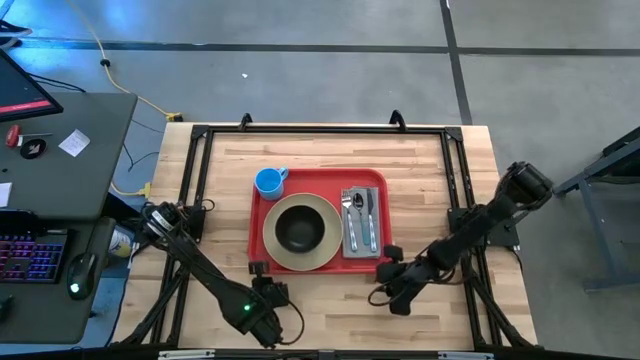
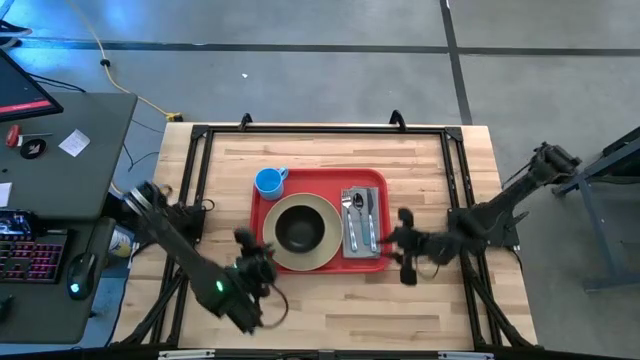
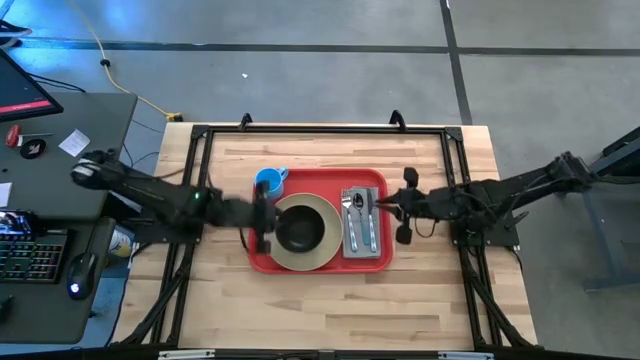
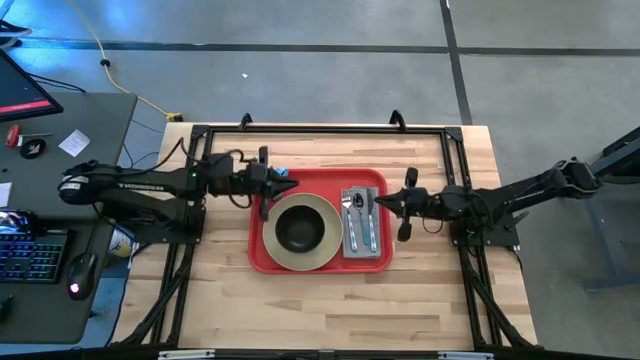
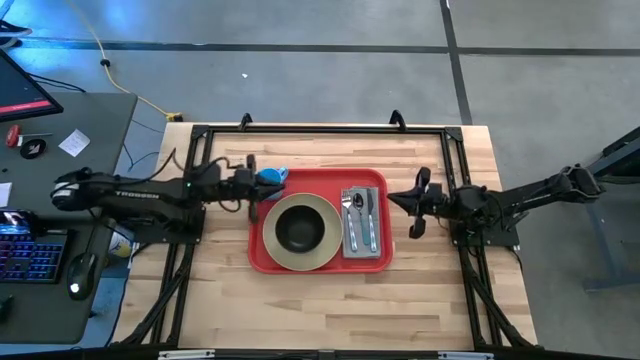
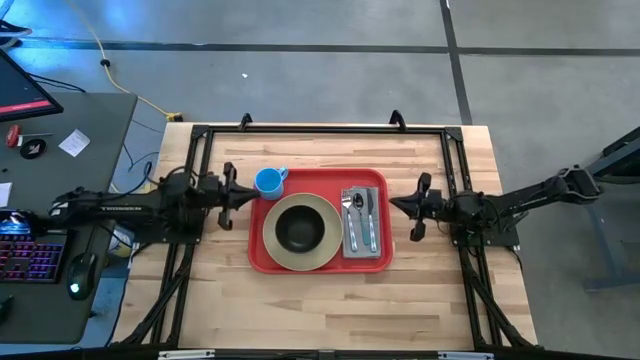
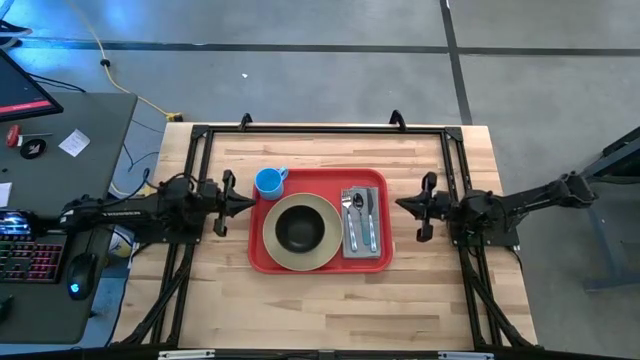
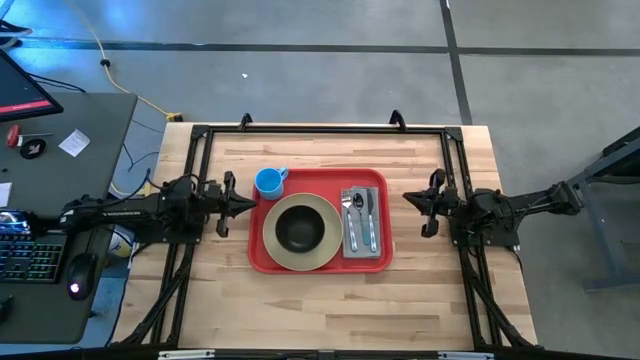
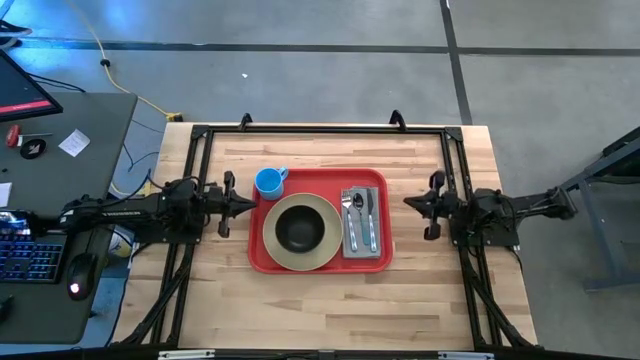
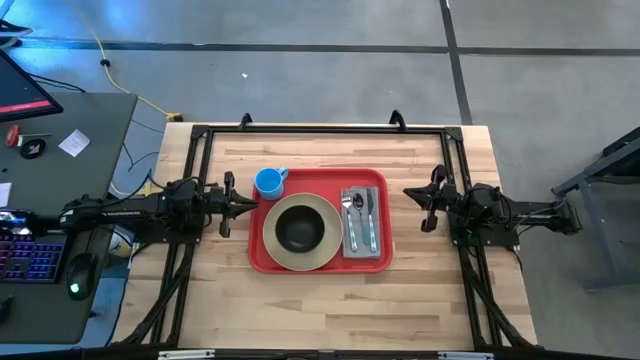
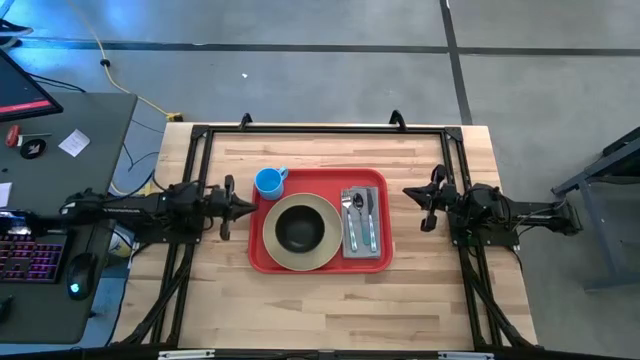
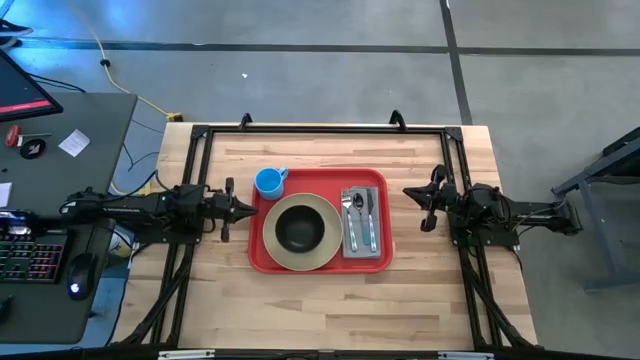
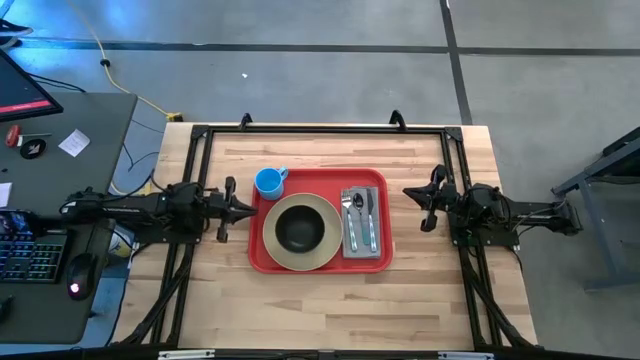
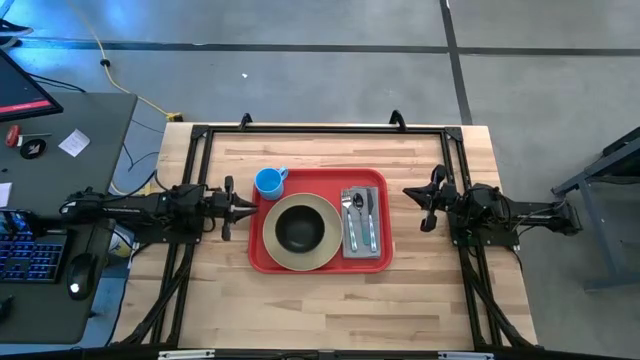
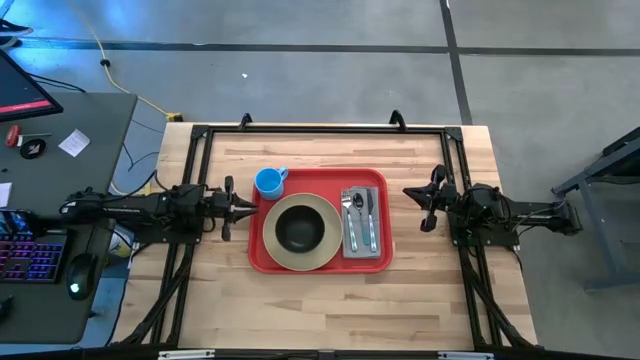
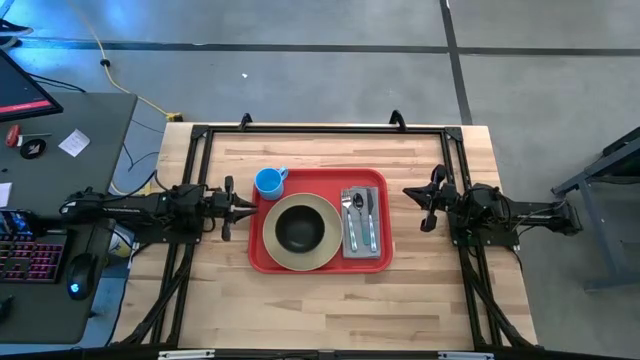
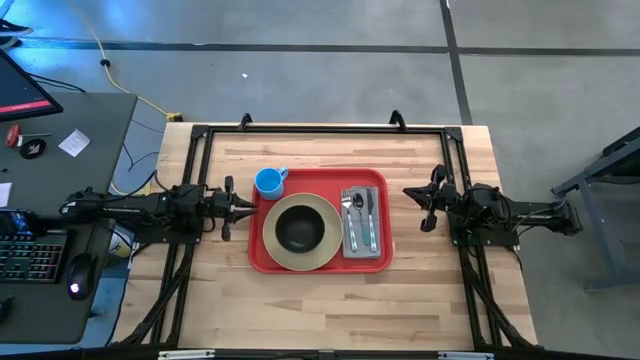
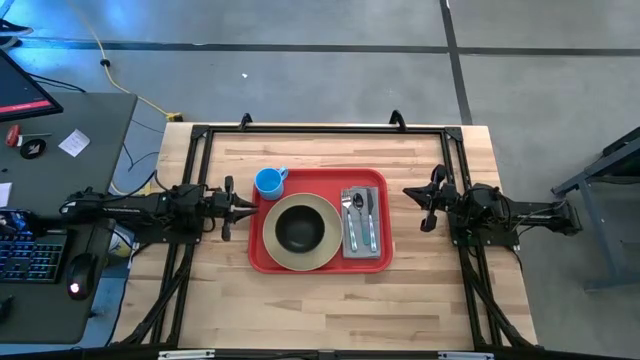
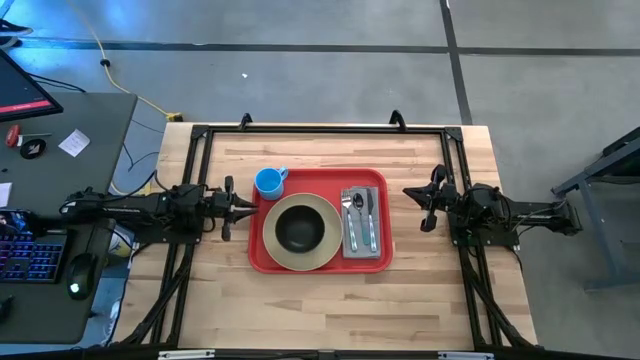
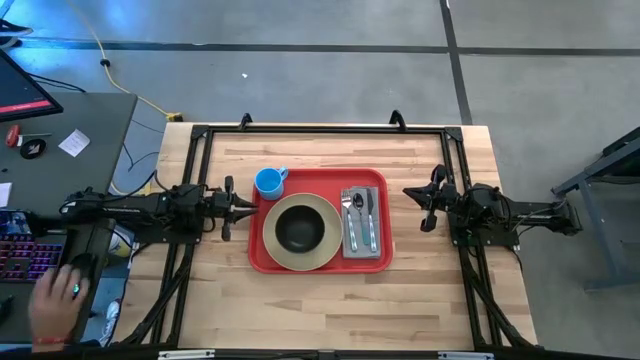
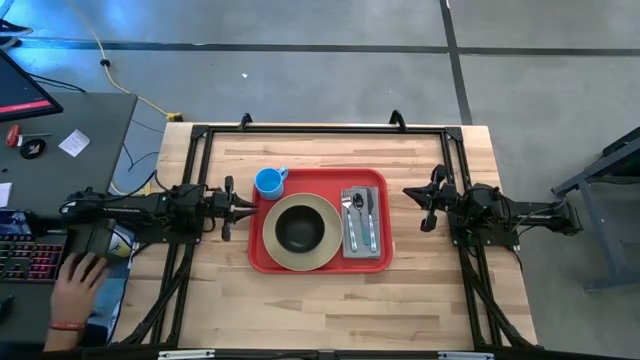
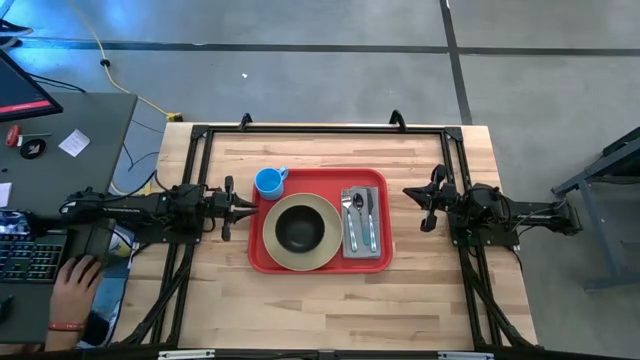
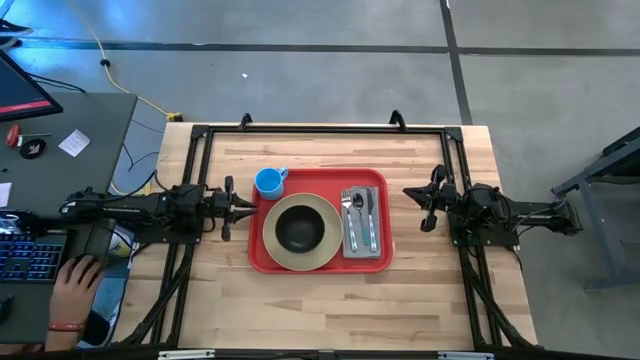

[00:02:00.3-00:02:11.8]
Task: Set up tray
Return to Home Position

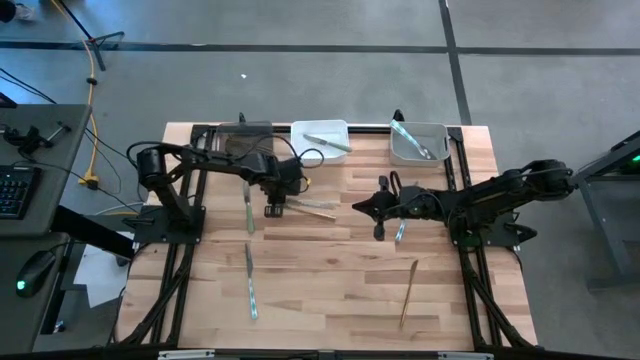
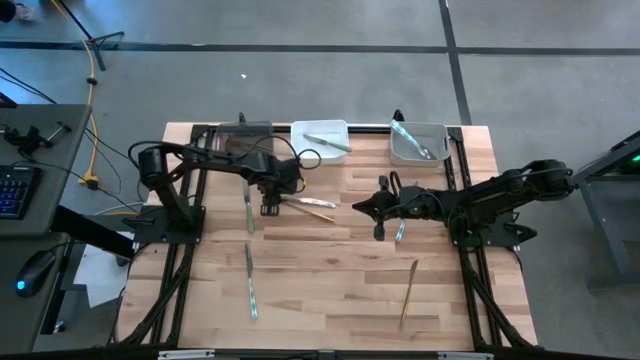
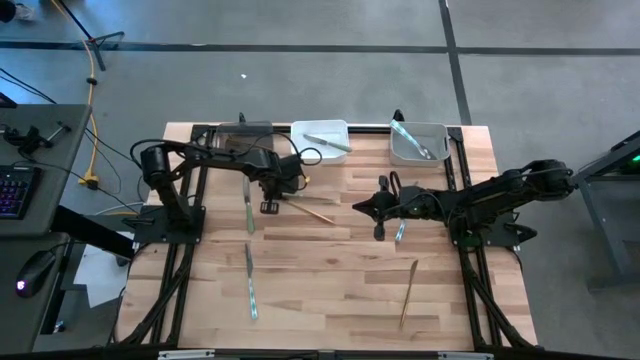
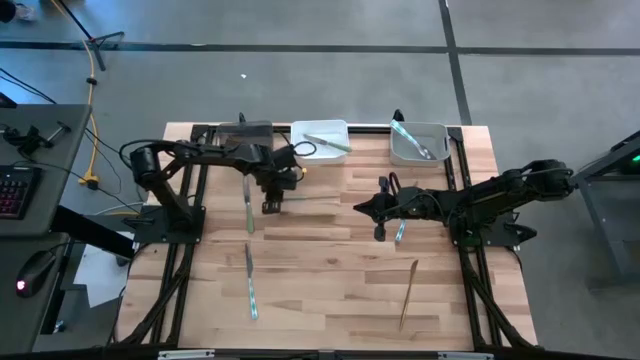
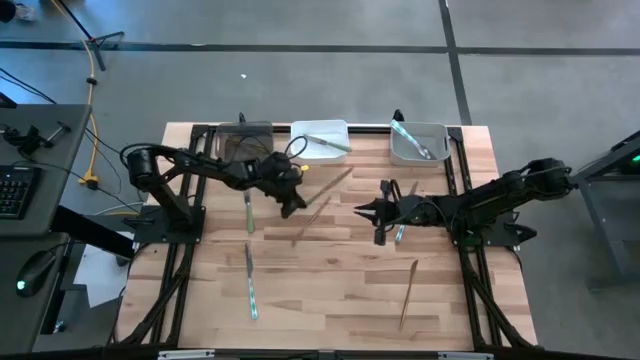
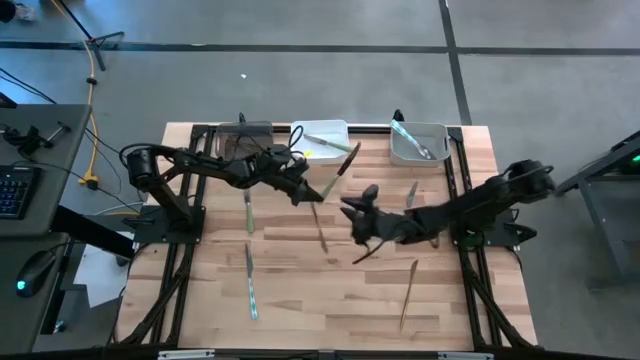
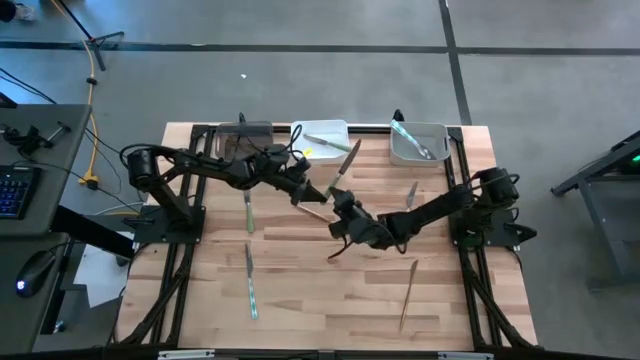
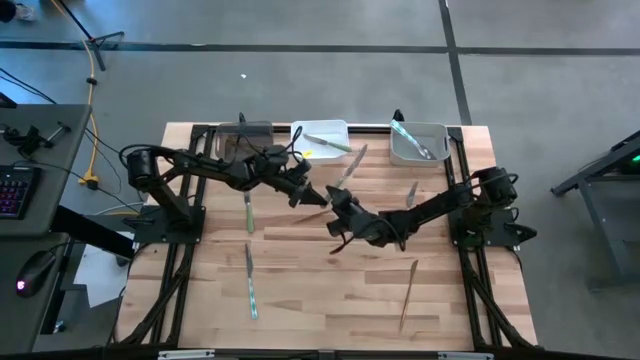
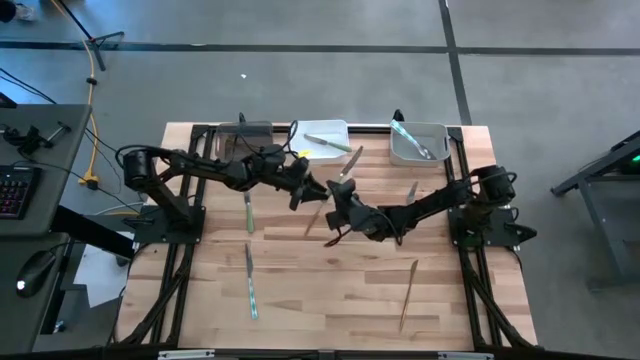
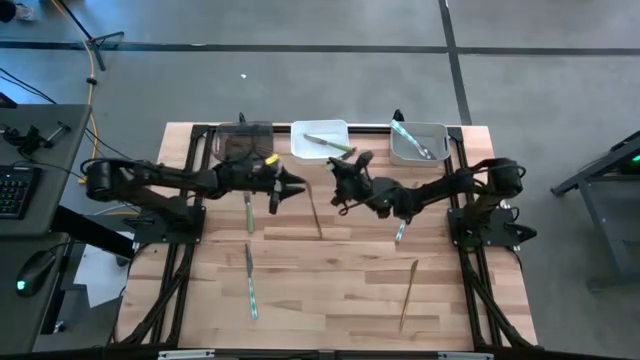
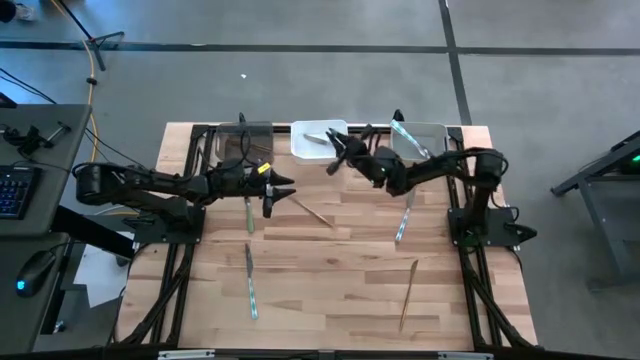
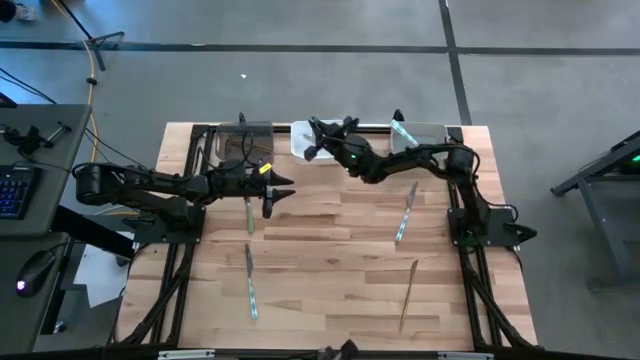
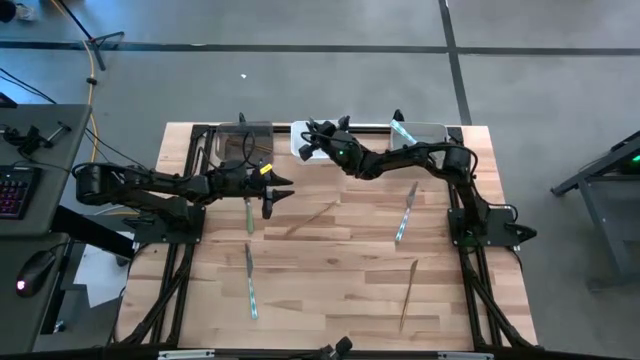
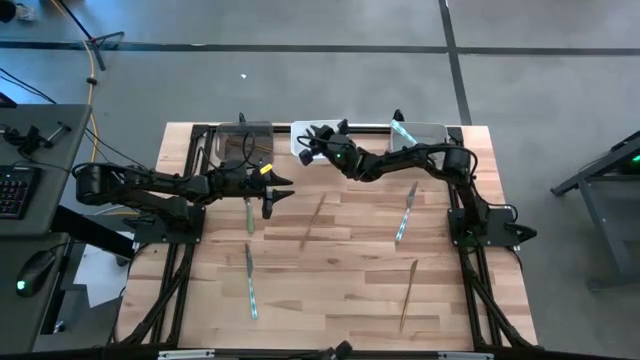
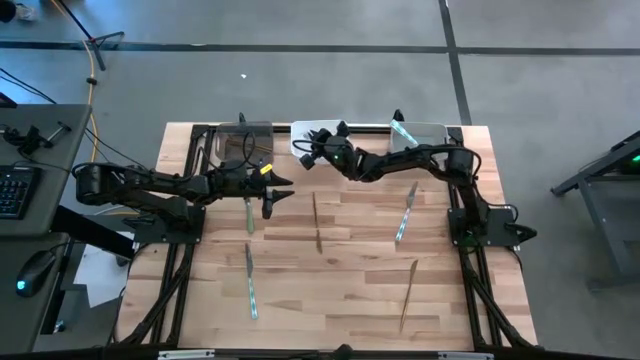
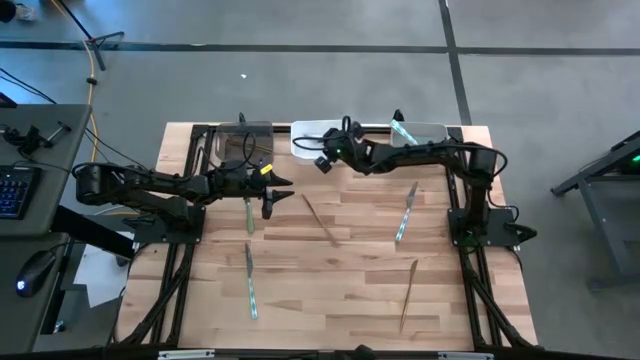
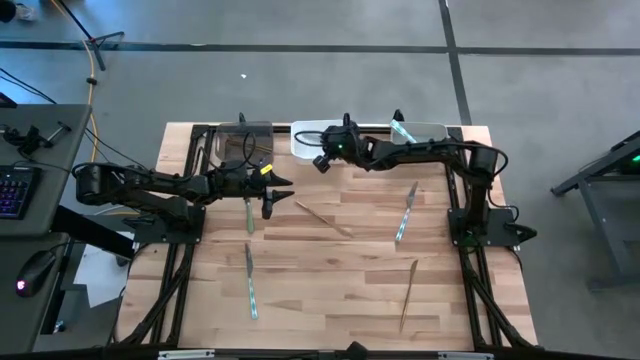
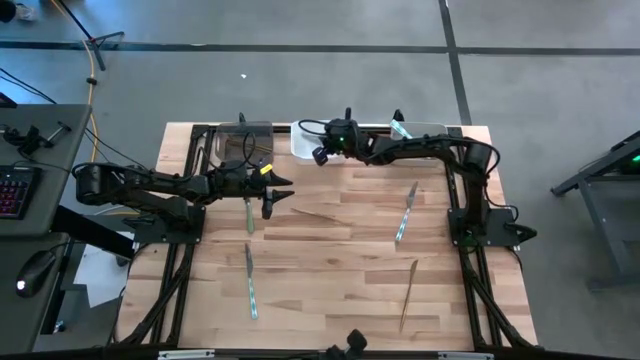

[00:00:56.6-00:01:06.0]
Task: Sort silverware by color (type)
Put the green knife into the white bin
